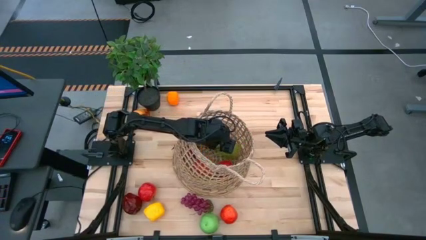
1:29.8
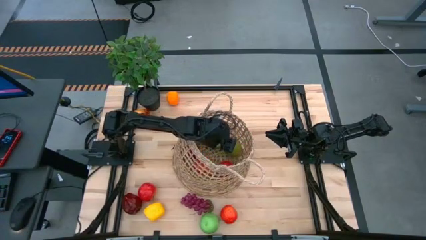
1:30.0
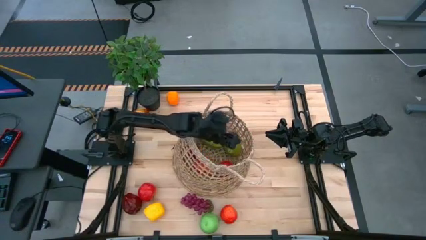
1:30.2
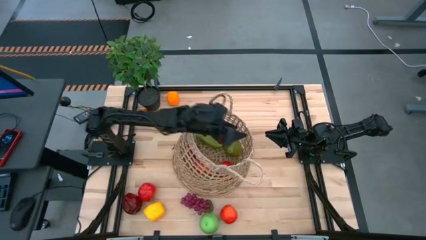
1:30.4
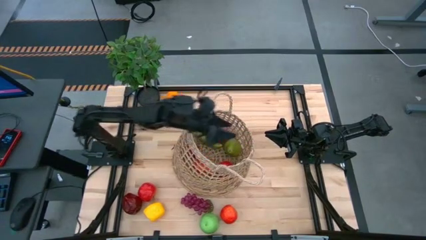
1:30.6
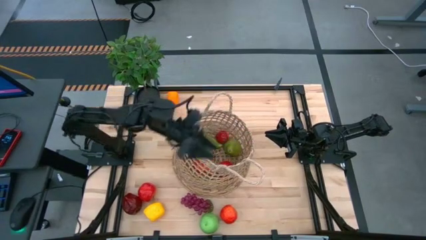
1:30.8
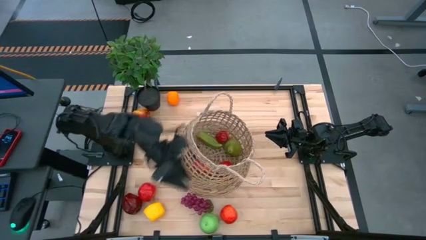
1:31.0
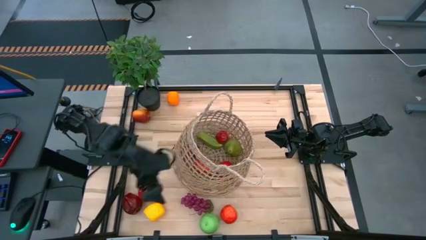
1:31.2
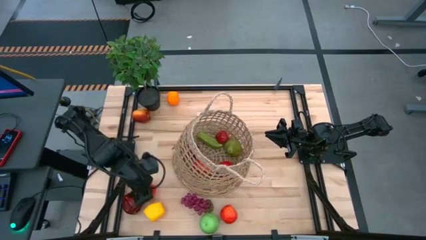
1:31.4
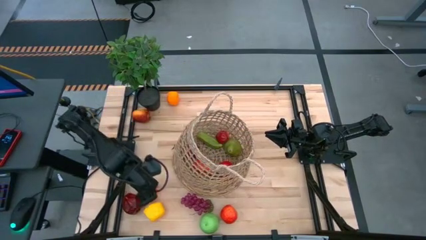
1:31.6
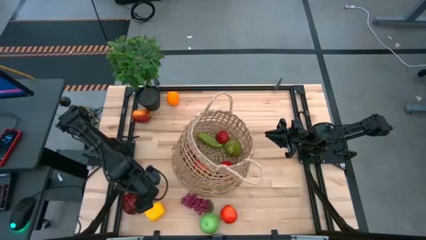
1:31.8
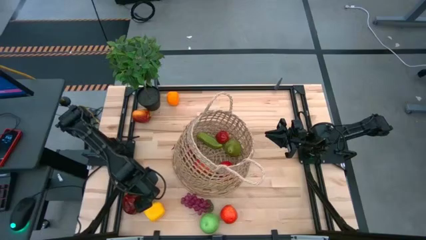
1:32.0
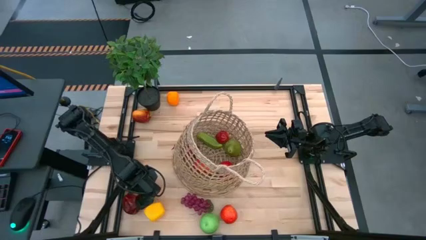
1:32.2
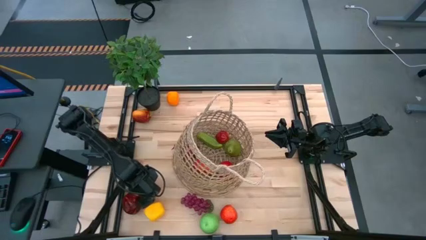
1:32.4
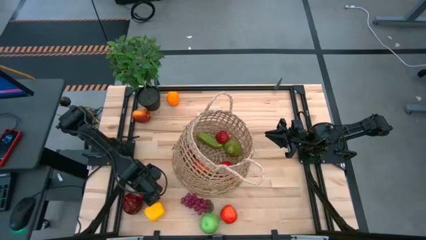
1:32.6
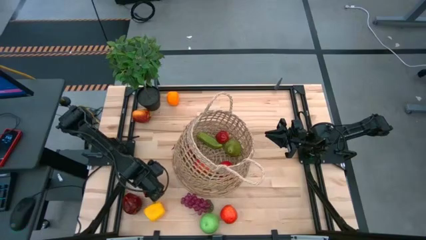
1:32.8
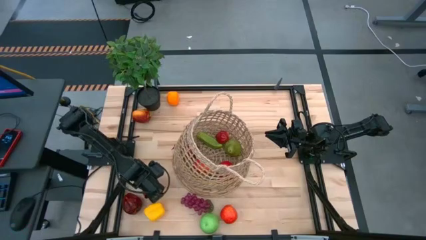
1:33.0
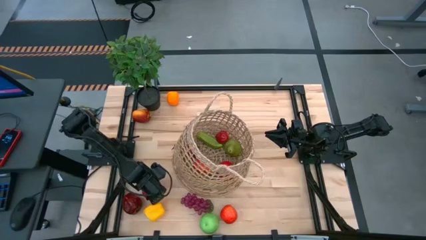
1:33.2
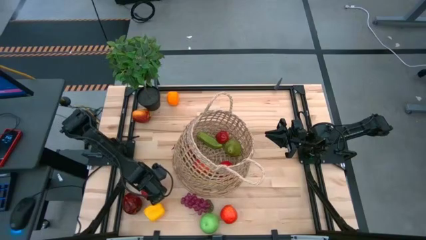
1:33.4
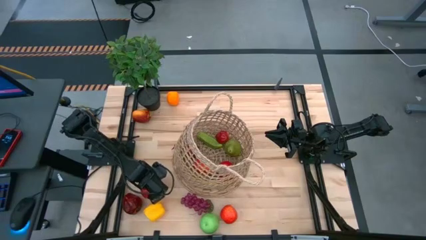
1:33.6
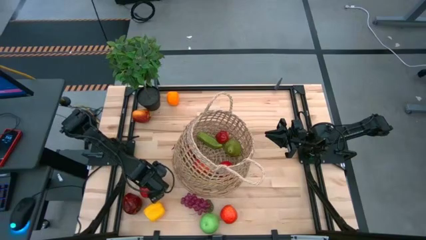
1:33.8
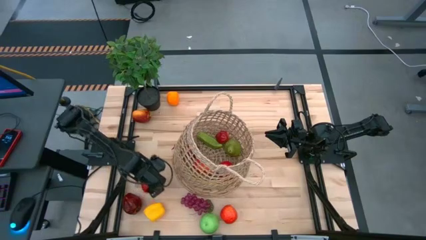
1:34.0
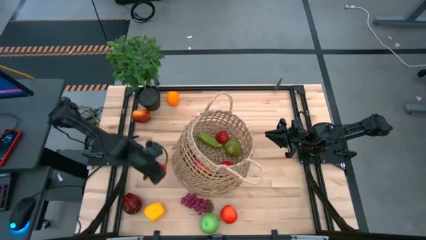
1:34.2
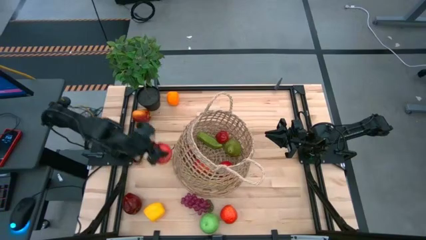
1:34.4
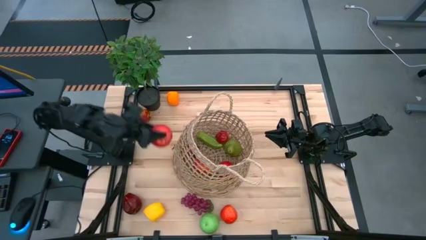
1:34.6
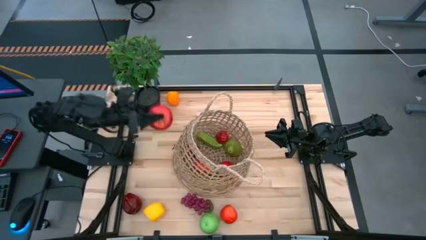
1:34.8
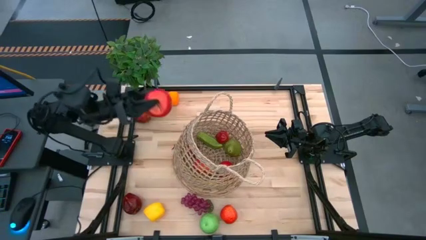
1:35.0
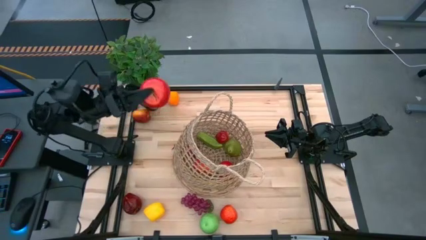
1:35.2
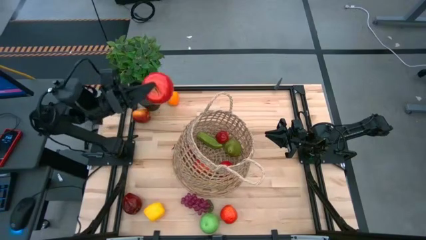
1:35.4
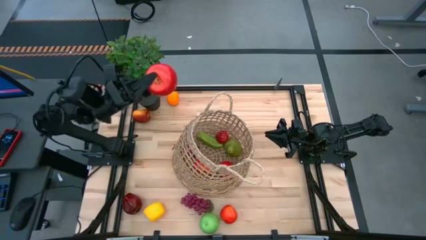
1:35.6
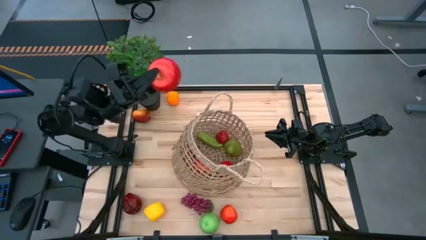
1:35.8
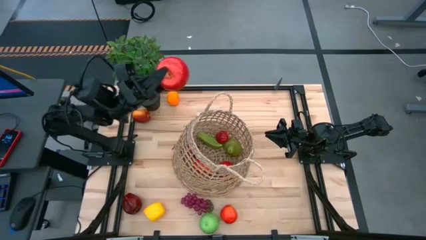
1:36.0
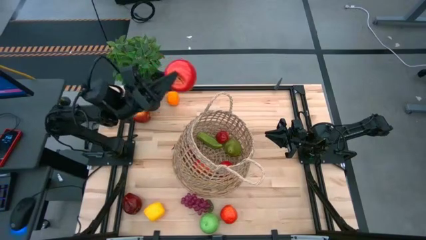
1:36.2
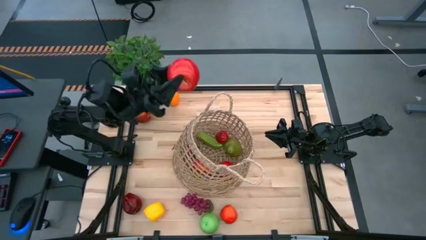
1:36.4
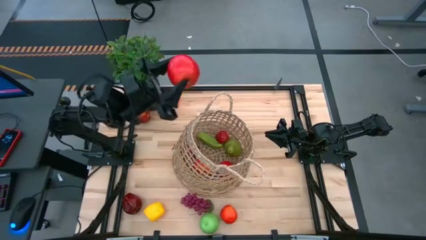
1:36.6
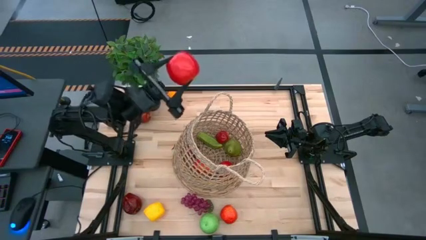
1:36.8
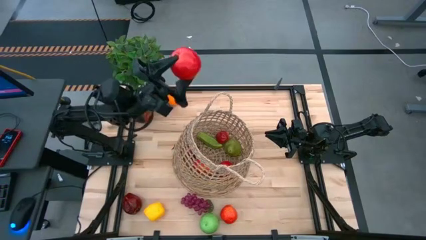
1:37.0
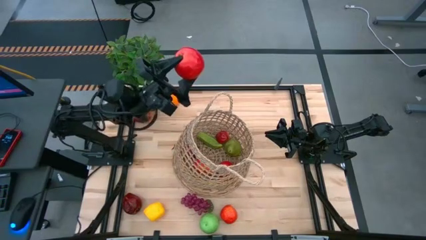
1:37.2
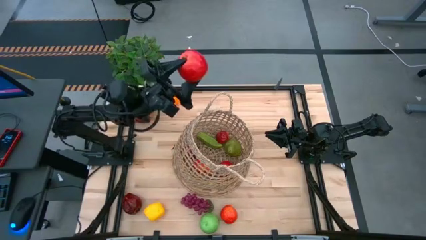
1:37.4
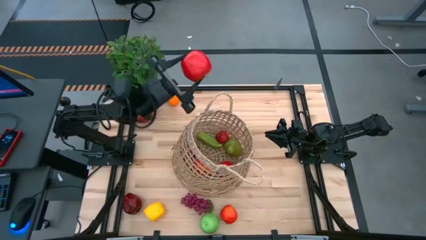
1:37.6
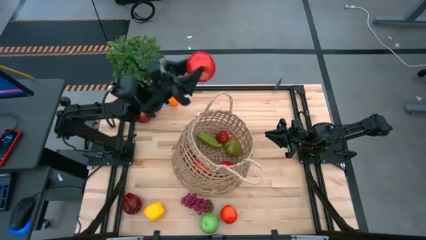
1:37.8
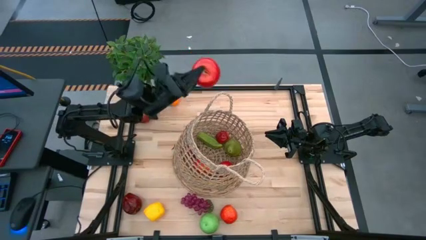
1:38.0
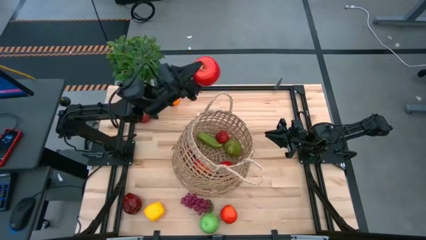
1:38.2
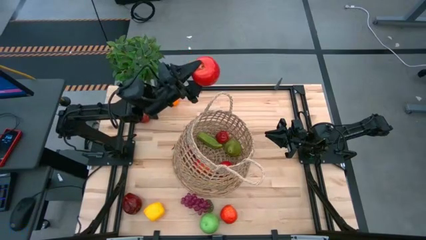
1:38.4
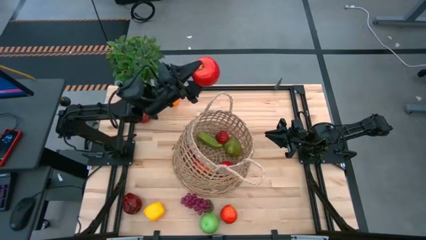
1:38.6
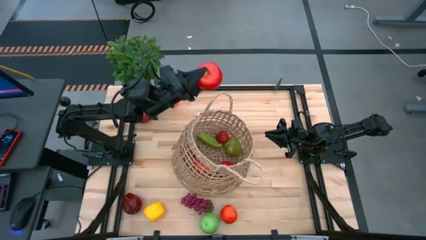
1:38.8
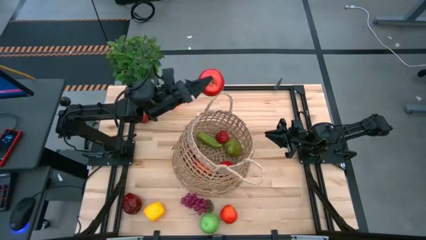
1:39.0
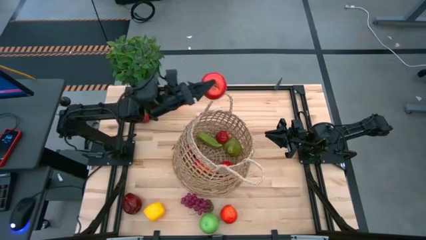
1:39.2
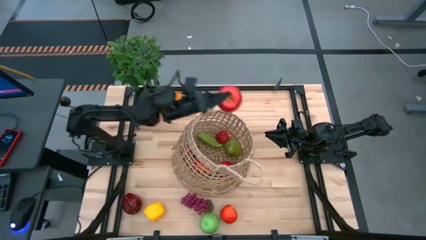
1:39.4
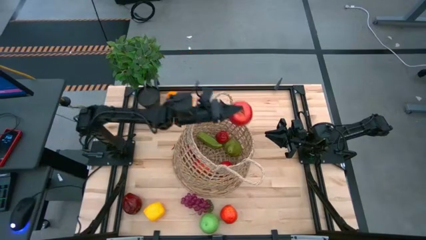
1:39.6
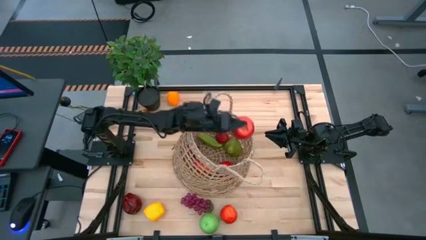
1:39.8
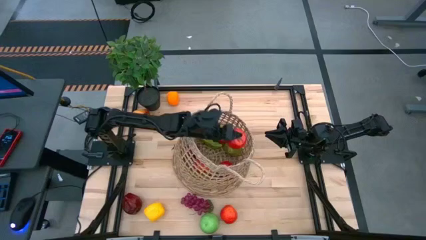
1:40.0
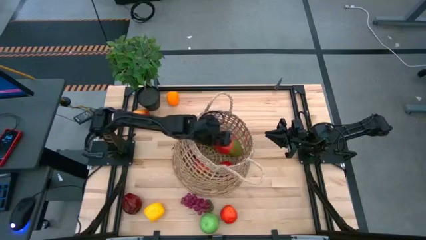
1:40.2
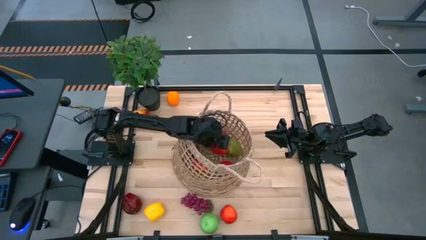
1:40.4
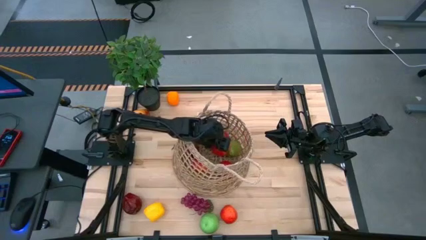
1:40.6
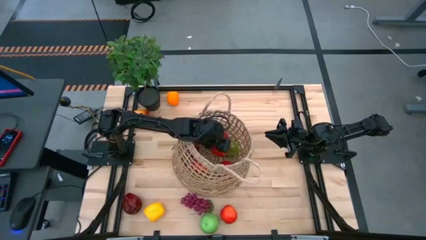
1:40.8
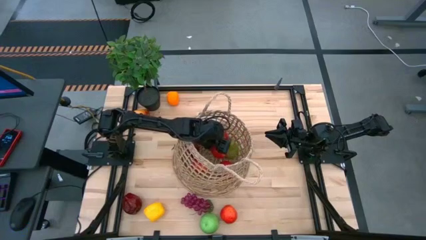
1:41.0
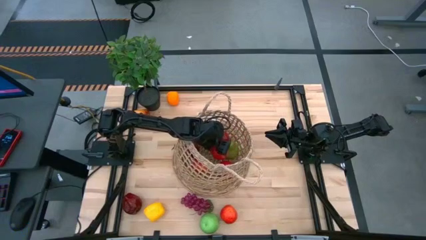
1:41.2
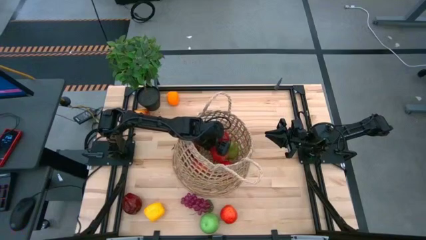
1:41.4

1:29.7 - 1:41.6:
Task: Build produce basket
Put the apple into the basket

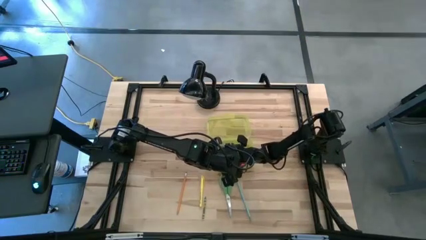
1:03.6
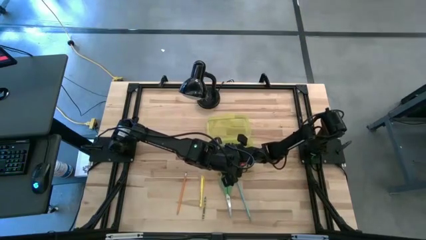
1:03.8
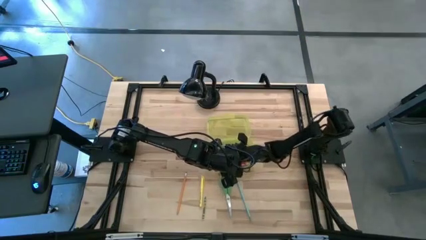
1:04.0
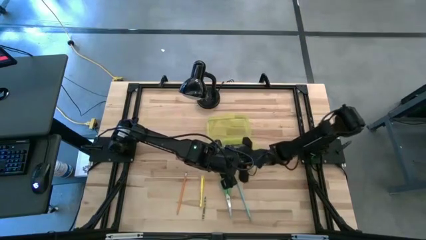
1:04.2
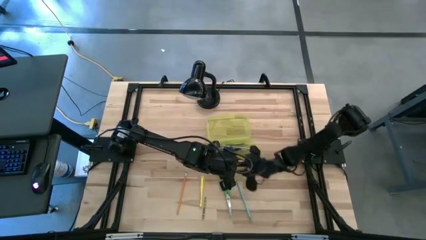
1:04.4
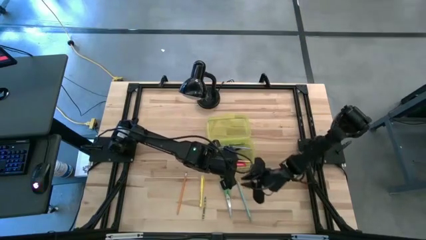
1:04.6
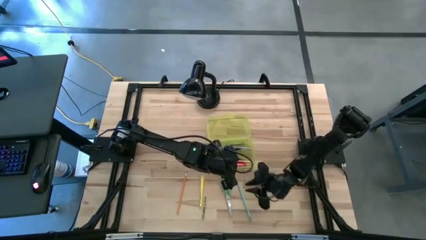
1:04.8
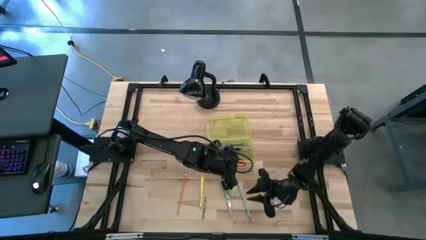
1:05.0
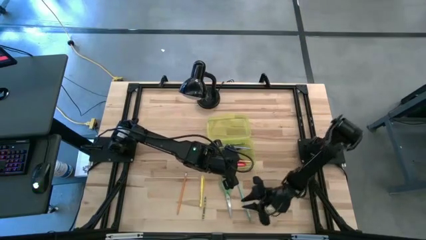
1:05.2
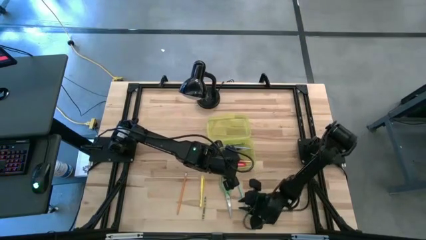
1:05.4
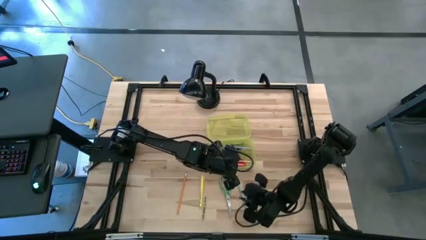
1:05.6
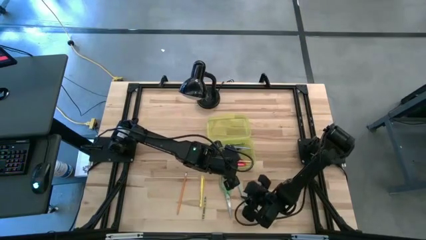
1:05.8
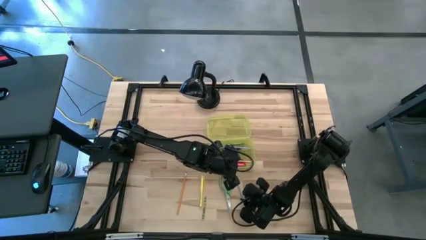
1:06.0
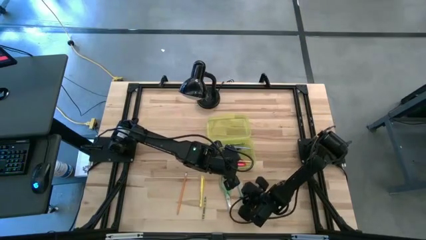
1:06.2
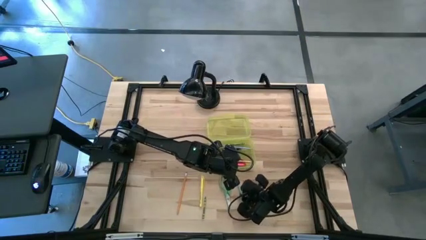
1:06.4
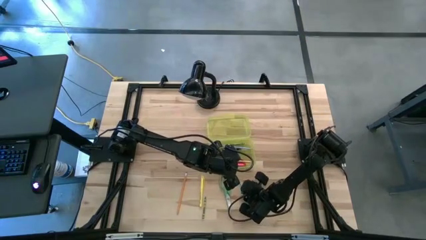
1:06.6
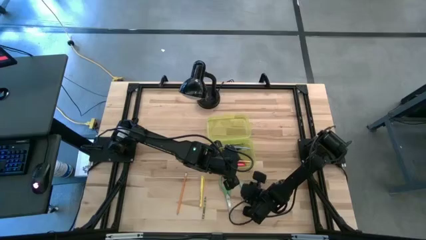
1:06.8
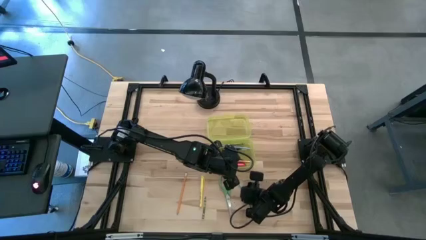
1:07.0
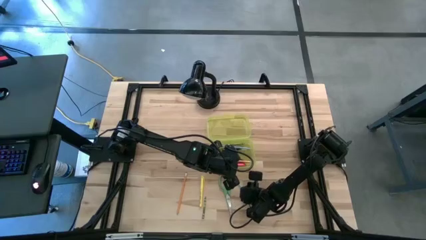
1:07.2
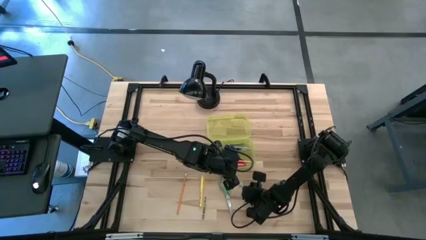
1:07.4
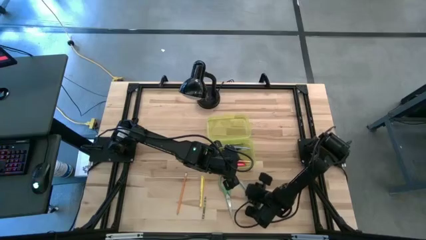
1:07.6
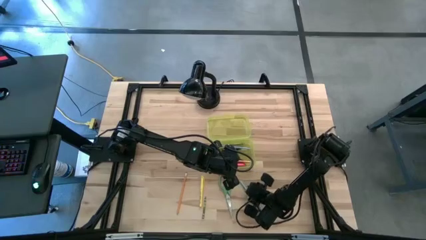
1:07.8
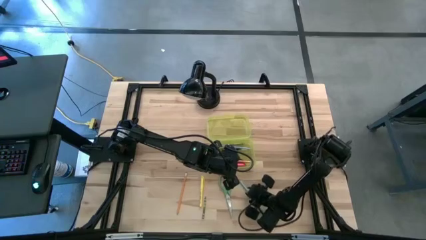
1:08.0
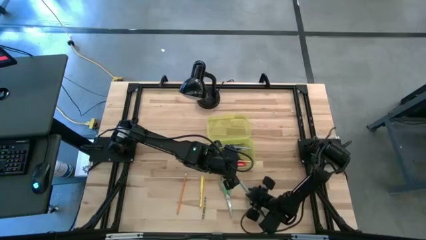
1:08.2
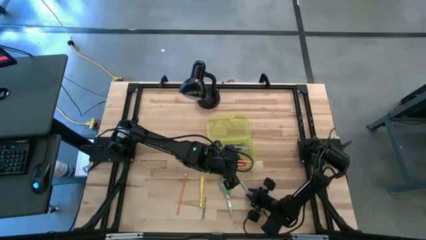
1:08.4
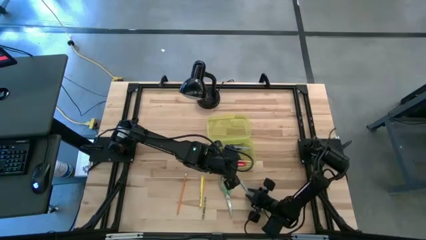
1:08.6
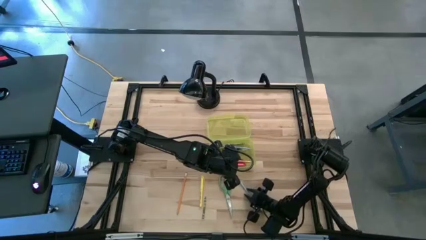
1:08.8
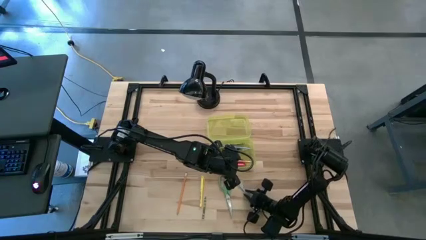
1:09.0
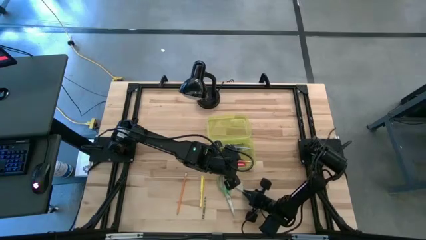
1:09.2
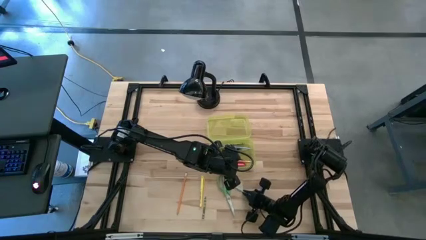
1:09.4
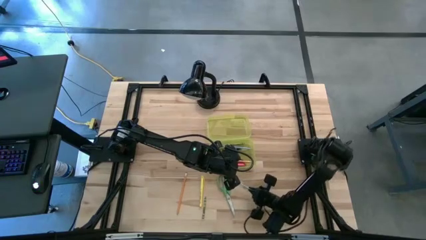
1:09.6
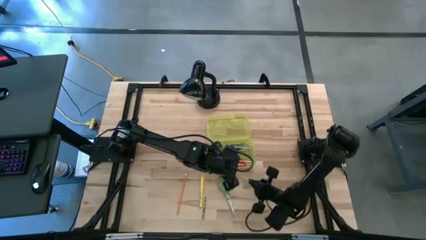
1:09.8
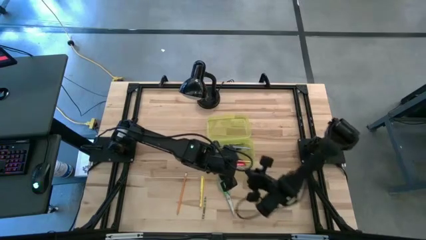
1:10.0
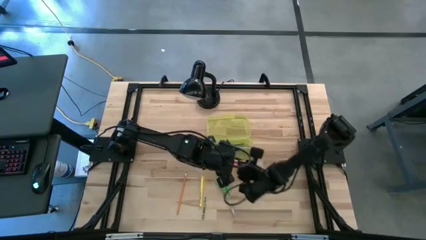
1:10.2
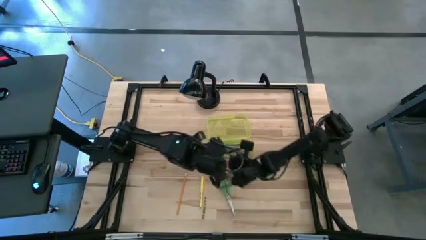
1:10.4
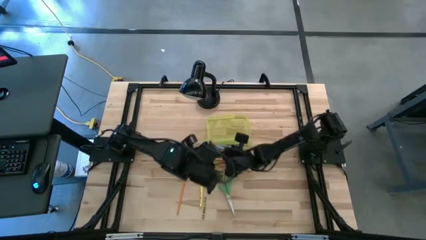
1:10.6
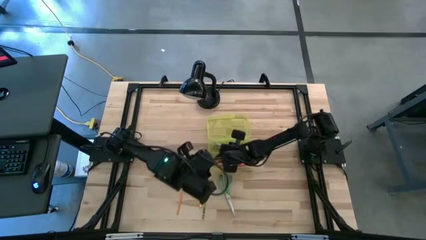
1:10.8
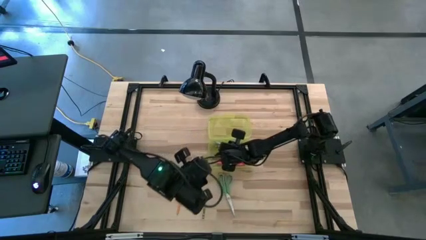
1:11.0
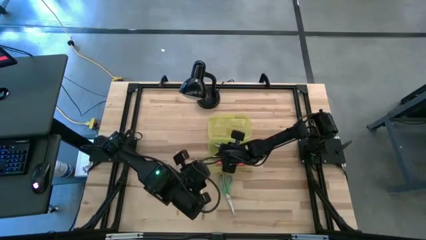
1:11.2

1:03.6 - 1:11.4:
Task: Pick & place school supplies into a supply box
Put the light blue pencil into the yellow supply box
